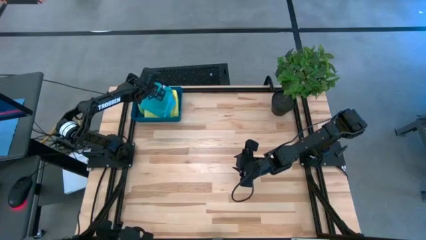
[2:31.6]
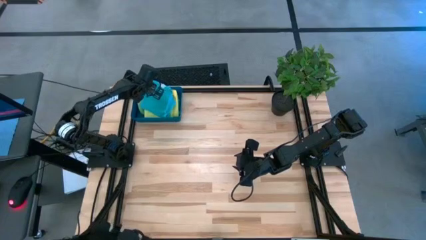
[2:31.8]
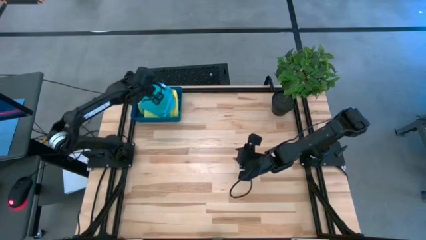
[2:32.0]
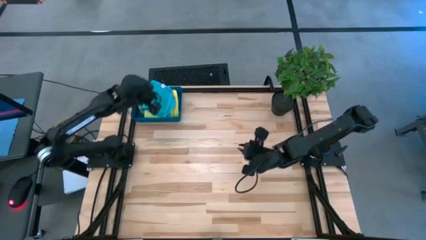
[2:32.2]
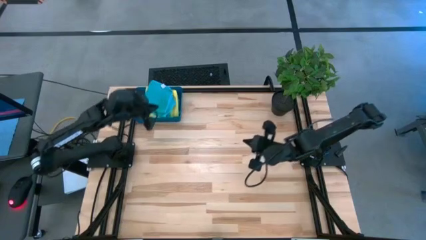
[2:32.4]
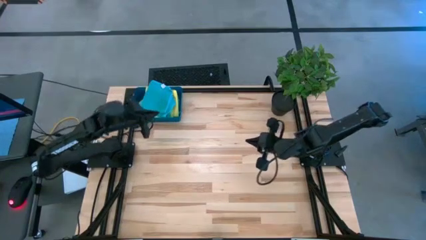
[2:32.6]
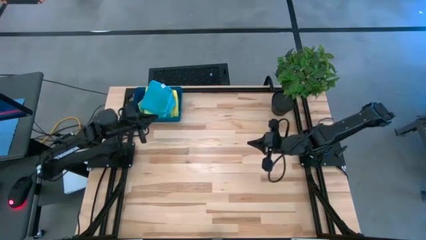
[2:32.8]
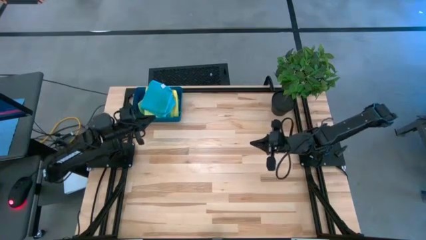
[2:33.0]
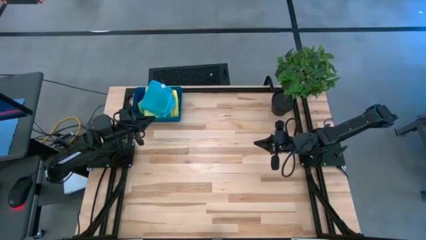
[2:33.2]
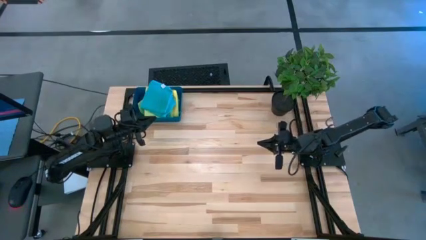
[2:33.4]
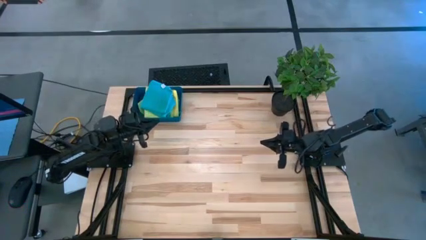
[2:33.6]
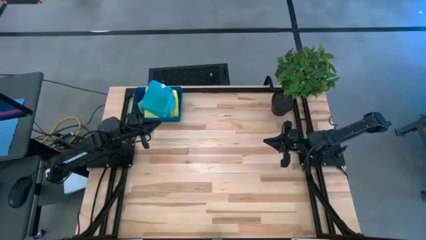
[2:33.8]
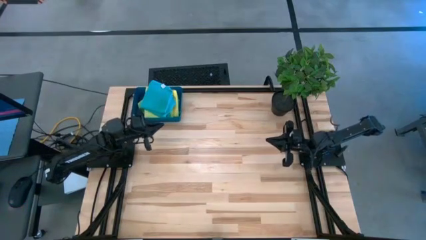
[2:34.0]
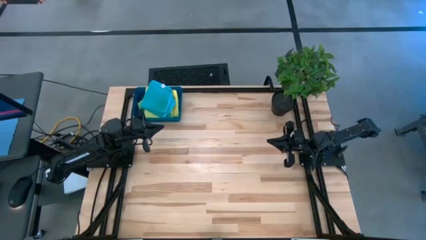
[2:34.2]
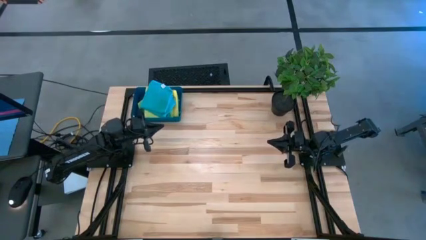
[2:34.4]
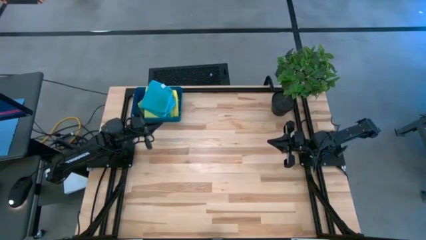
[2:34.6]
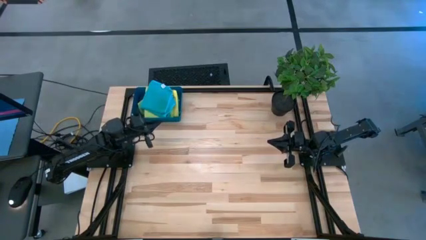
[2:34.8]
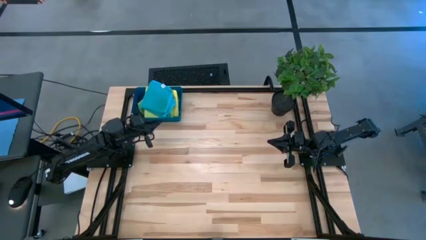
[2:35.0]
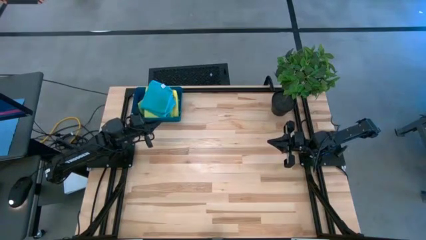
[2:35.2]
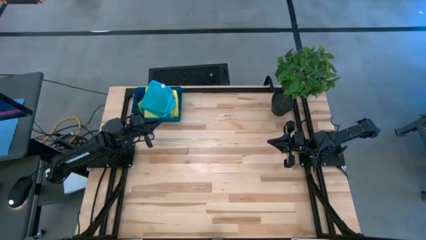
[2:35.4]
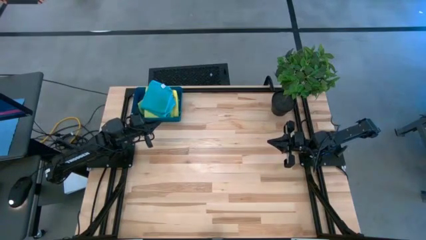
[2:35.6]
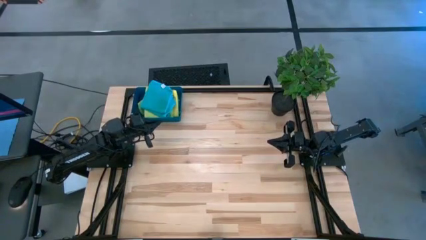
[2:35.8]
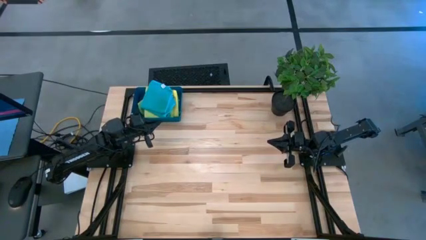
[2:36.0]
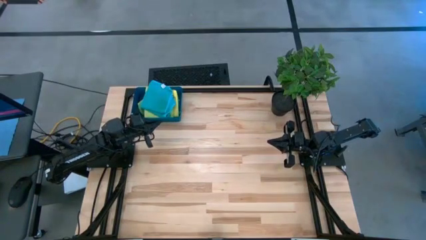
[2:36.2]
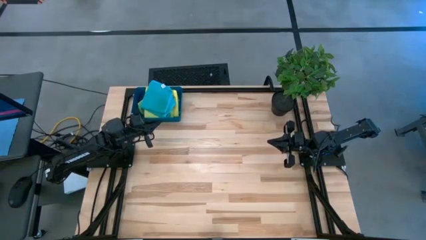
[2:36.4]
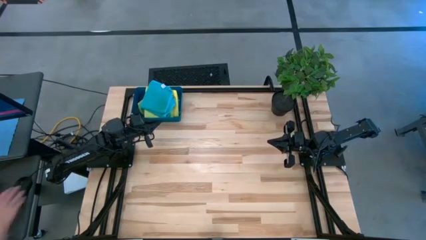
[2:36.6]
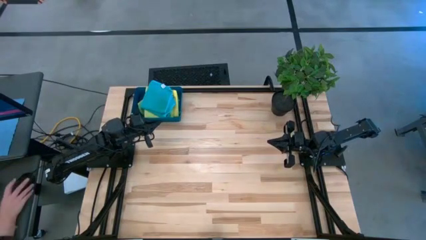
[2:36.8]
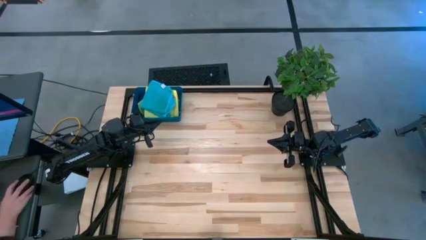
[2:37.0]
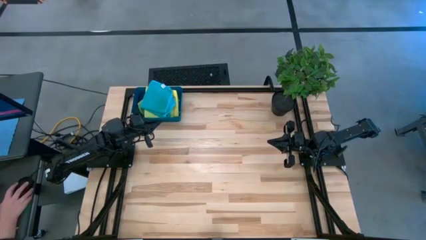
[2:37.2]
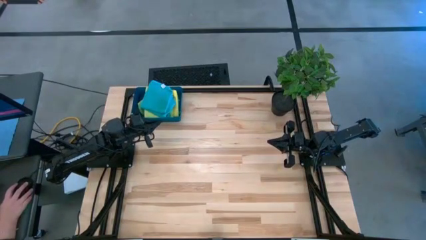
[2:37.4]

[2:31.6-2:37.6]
Task: Fold microfiber towels
Return to Home Position

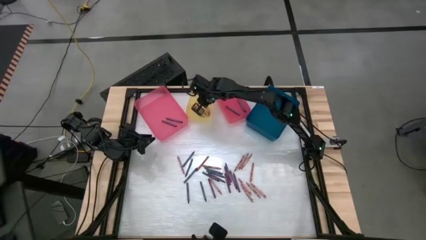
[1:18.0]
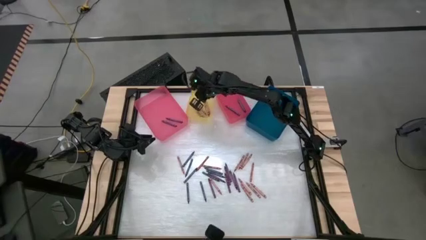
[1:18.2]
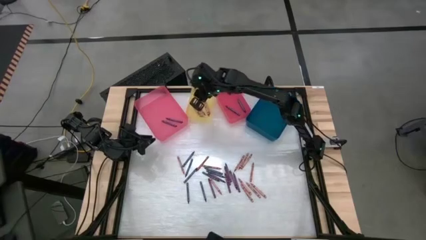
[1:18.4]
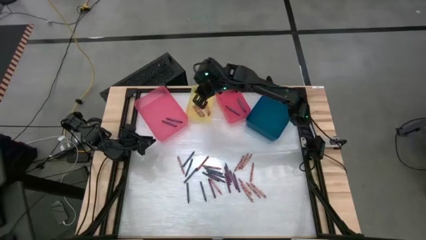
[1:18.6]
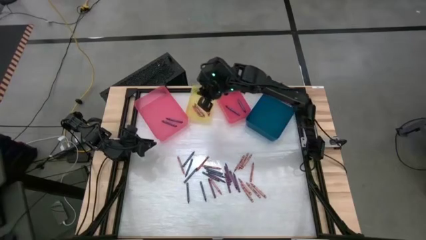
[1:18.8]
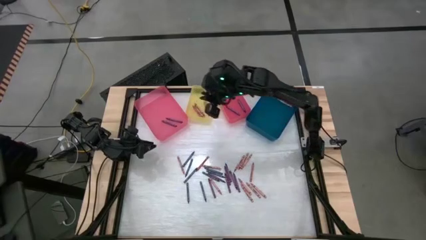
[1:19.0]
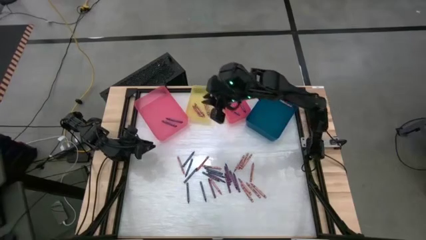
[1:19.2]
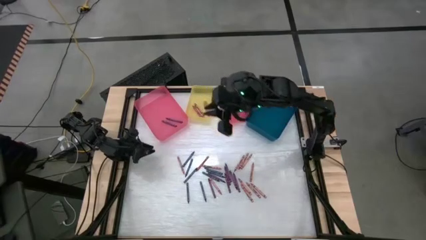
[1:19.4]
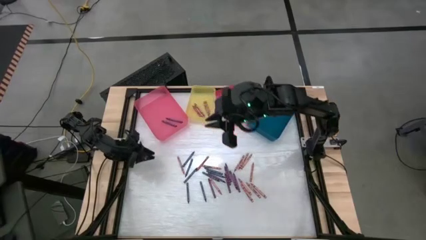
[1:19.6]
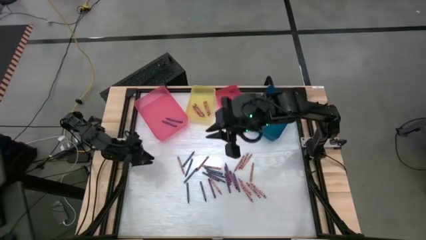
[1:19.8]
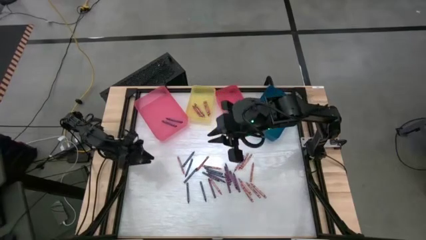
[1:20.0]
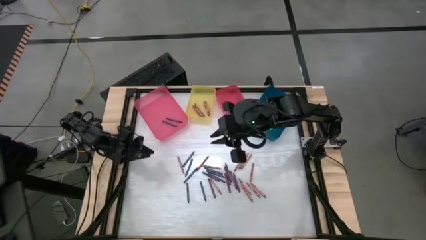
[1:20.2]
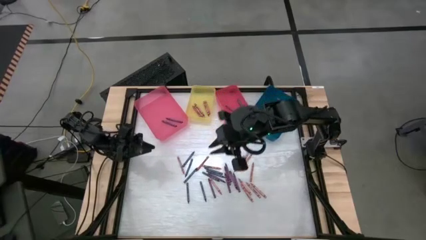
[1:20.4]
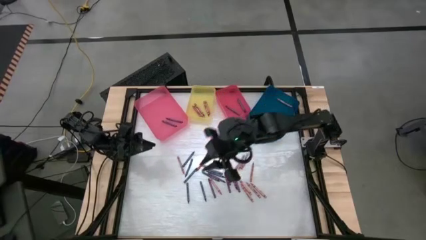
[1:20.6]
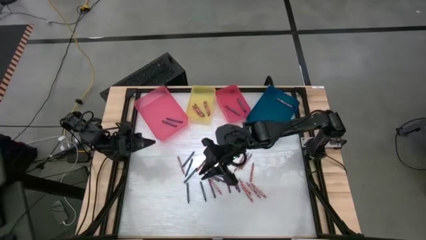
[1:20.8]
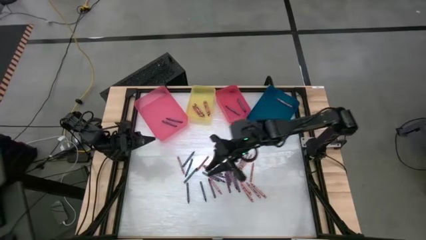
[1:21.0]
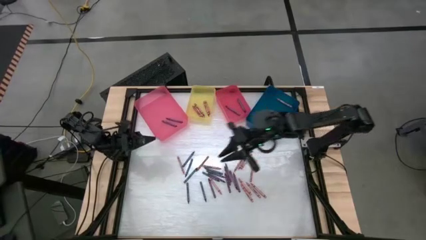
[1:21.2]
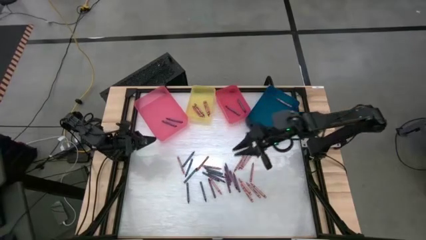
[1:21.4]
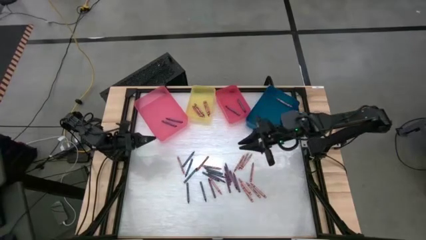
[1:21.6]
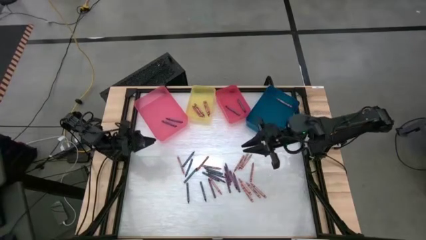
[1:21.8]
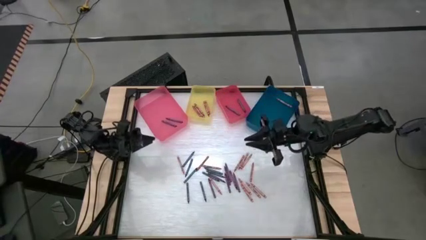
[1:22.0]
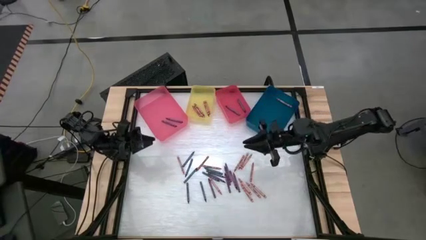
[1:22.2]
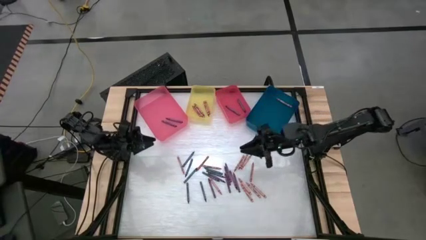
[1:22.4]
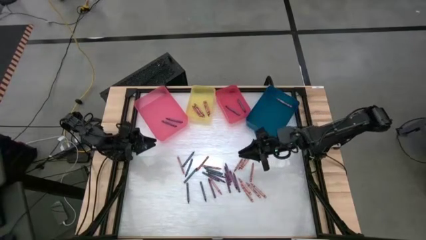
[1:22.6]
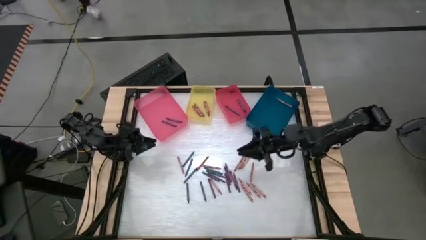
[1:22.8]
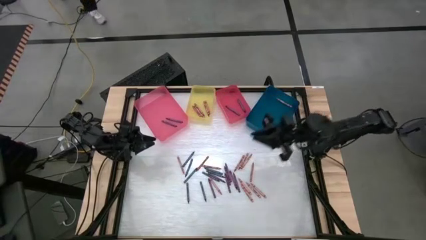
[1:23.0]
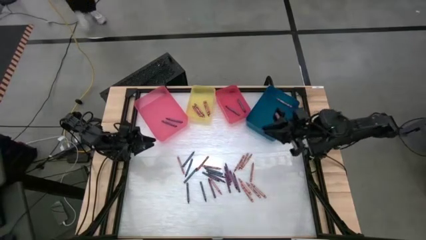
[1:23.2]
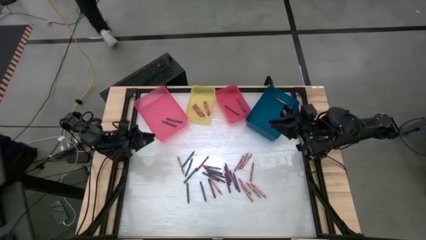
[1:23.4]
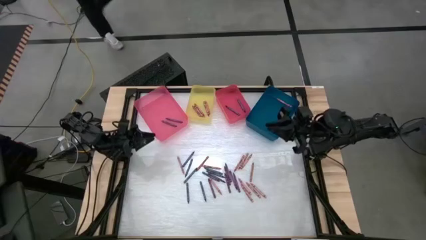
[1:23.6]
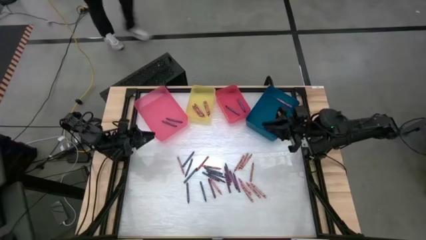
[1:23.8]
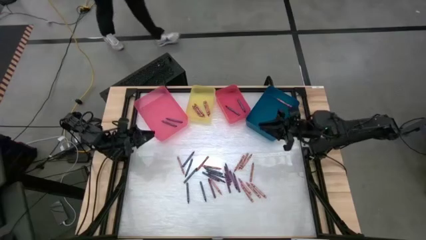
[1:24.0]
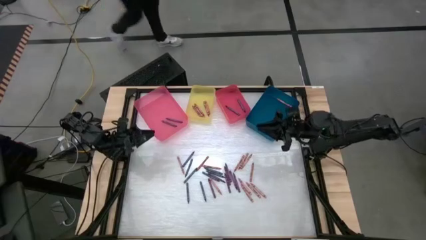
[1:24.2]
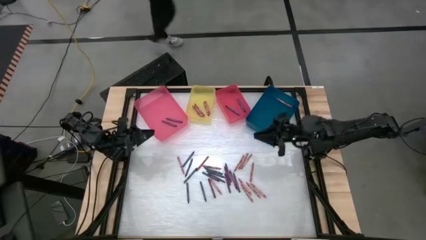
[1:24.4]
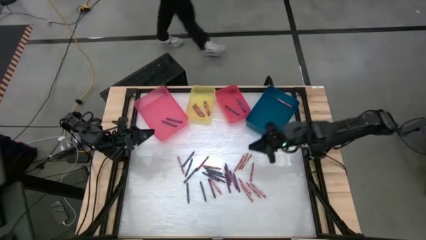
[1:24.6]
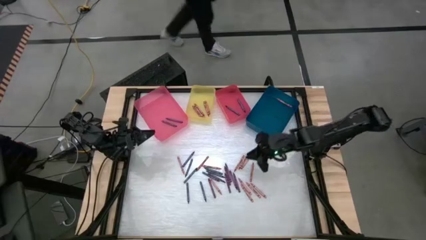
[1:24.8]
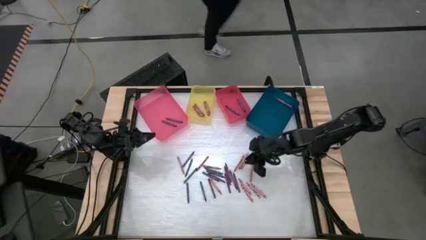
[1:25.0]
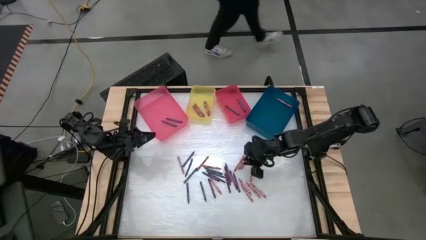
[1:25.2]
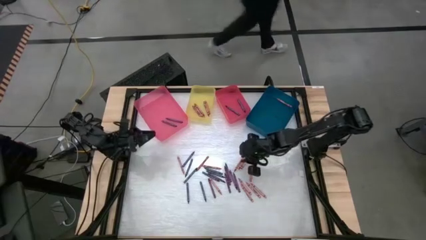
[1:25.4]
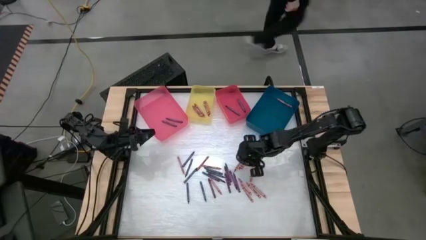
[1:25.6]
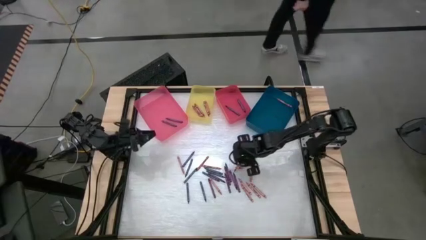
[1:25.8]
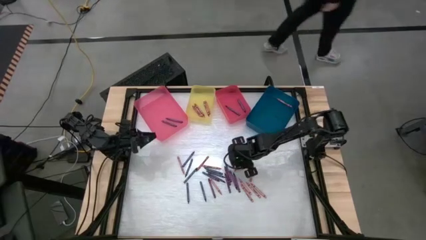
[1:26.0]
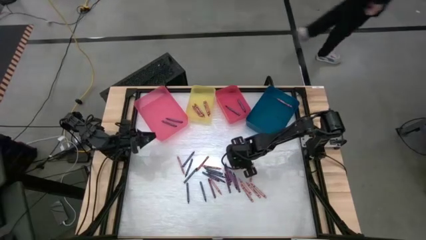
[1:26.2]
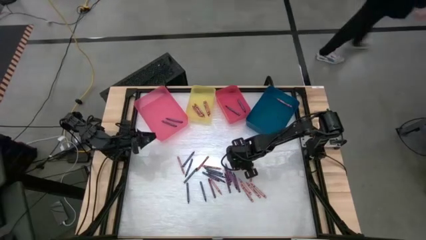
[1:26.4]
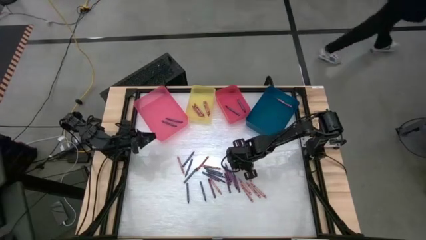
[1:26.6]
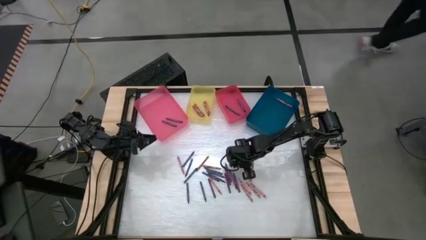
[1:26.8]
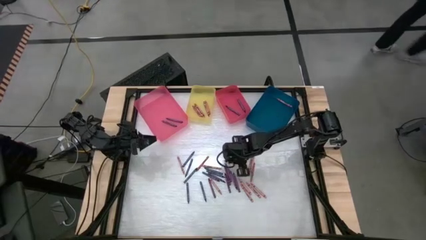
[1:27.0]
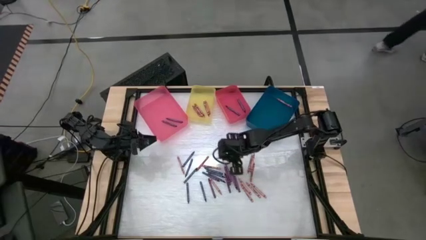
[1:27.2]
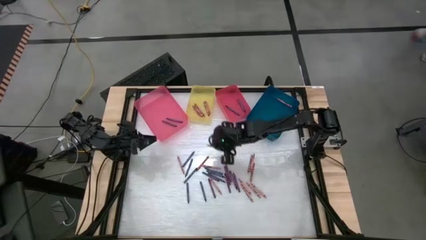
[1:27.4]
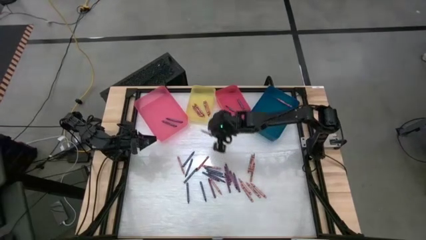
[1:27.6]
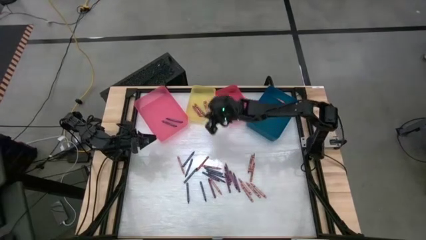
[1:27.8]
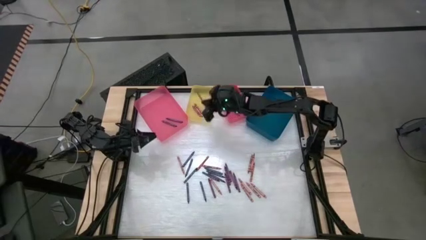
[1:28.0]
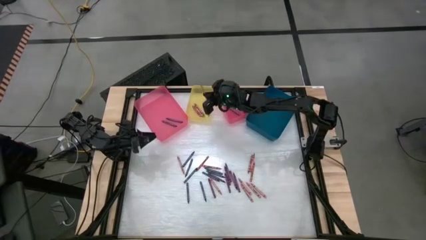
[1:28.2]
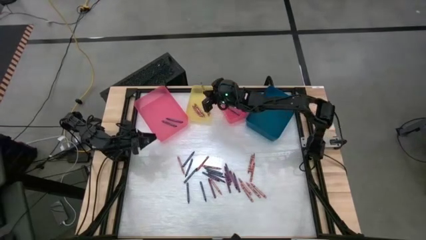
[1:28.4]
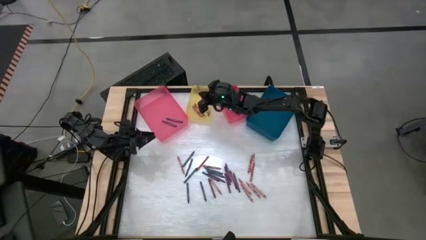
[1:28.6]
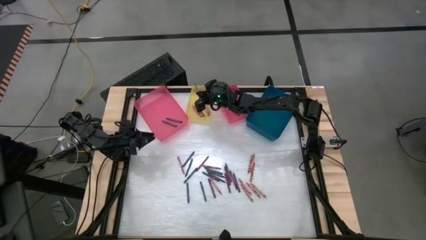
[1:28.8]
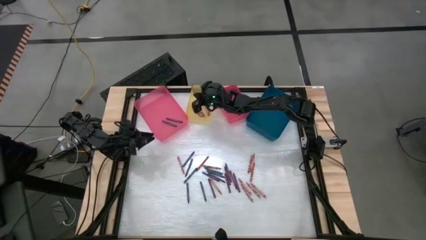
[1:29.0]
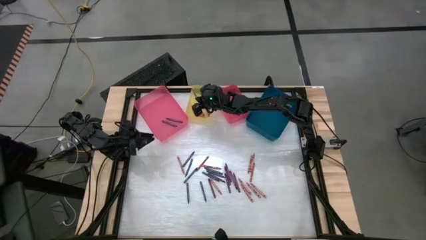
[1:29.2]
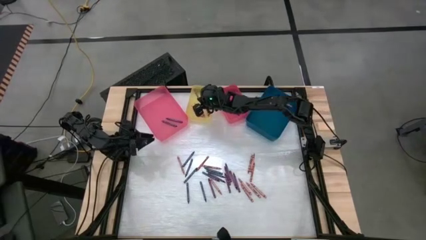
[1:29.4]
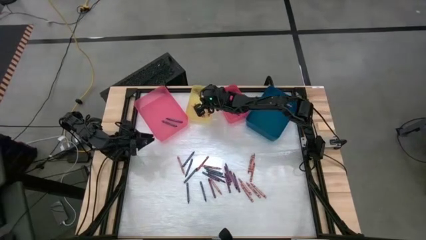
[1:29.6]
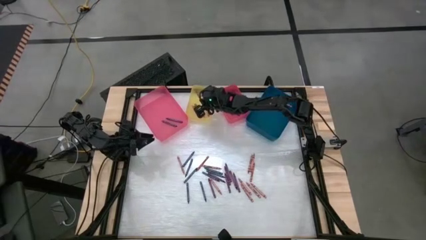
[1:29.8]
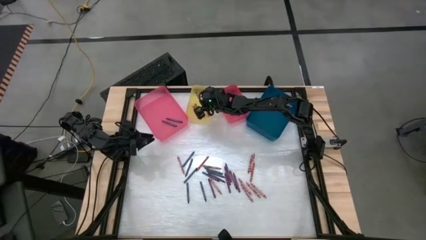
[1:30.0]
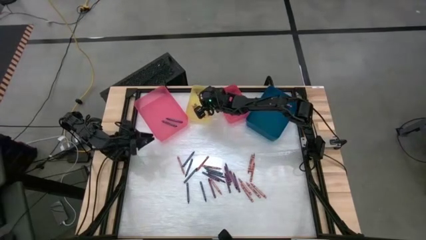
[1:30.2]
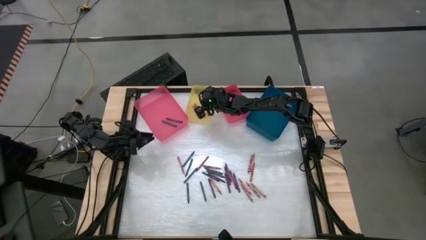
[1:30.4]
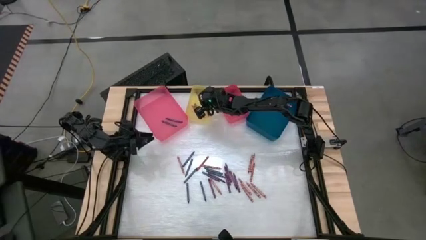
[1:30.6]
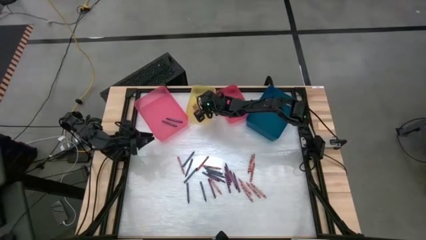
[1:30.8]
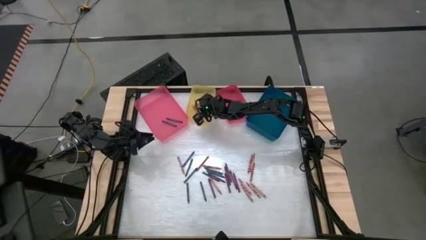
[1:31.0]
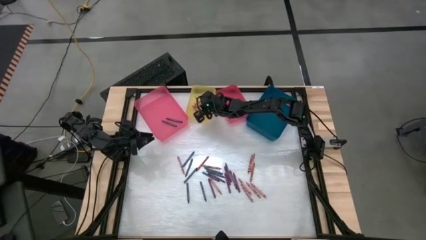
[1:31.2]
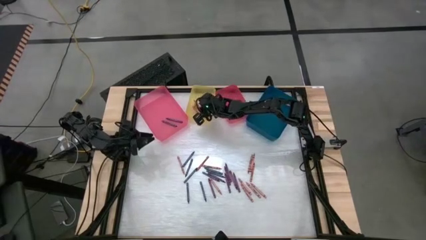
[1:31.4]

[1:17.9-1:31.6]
Task: Sort crayons
Put the red crayon into the yellow bin
